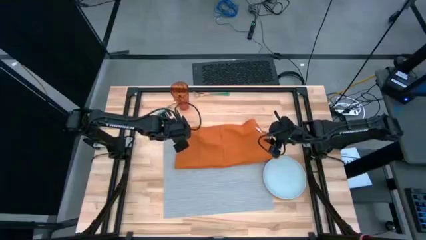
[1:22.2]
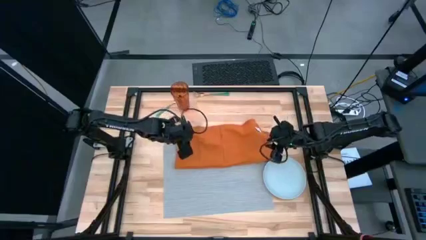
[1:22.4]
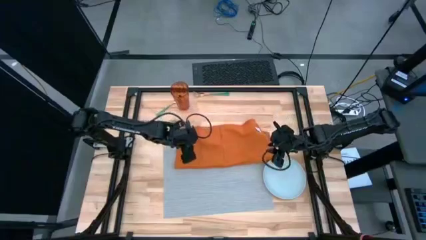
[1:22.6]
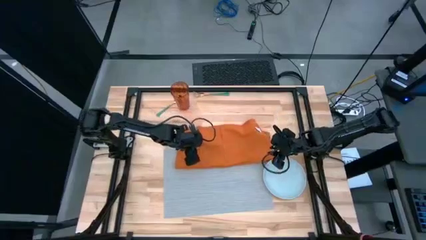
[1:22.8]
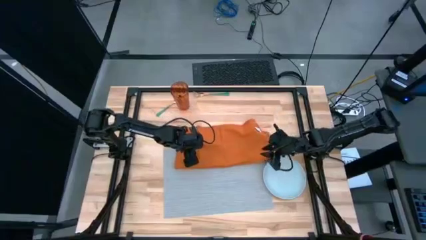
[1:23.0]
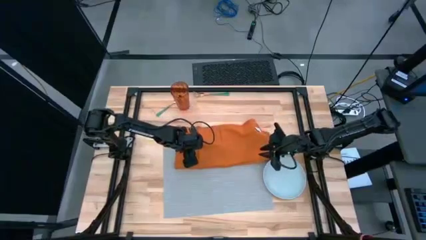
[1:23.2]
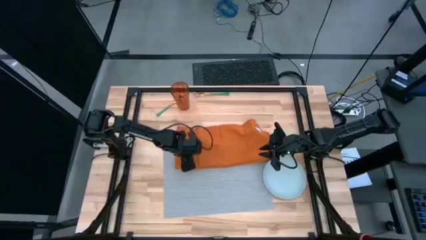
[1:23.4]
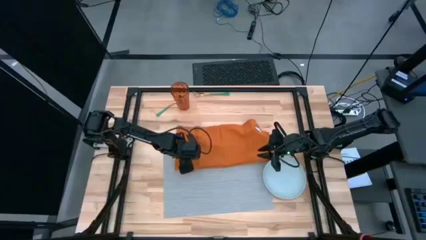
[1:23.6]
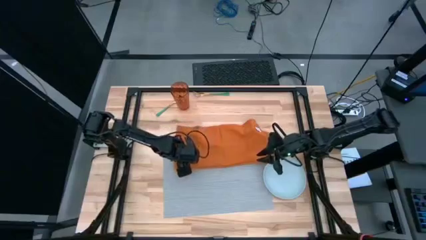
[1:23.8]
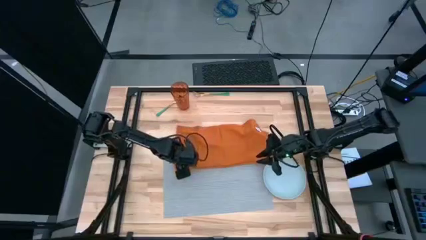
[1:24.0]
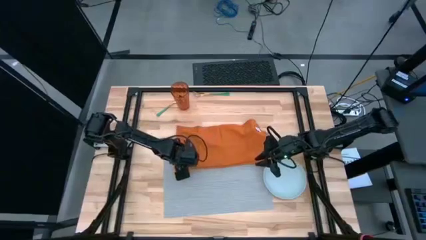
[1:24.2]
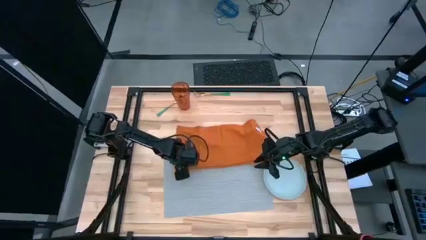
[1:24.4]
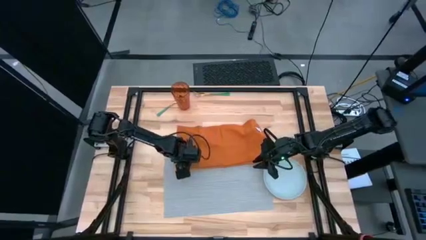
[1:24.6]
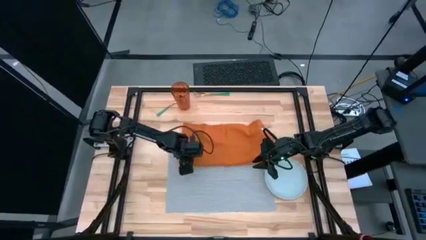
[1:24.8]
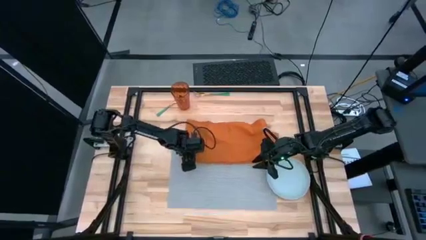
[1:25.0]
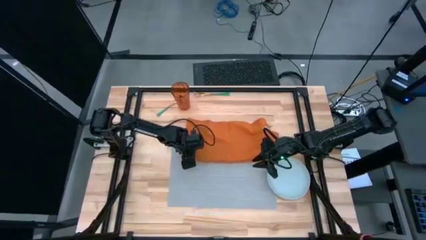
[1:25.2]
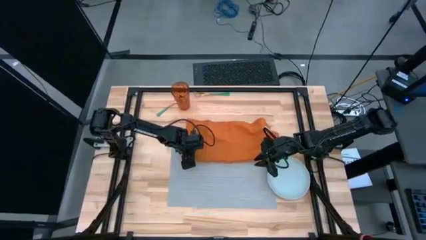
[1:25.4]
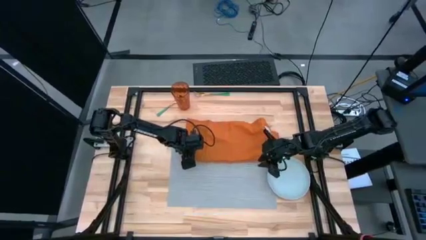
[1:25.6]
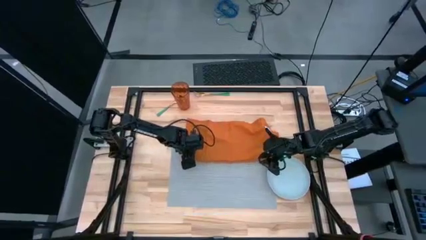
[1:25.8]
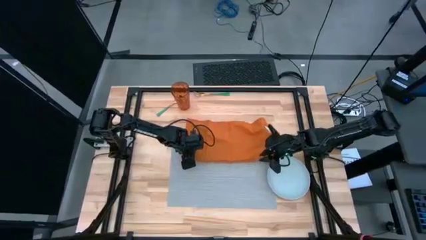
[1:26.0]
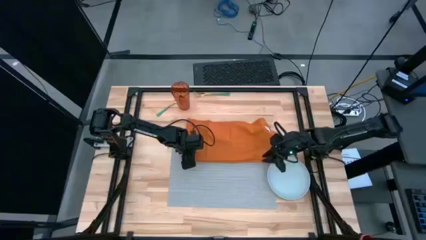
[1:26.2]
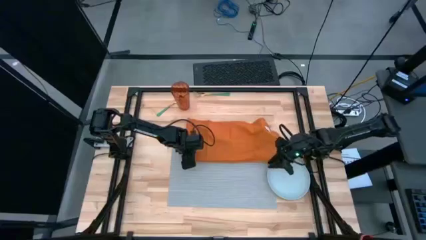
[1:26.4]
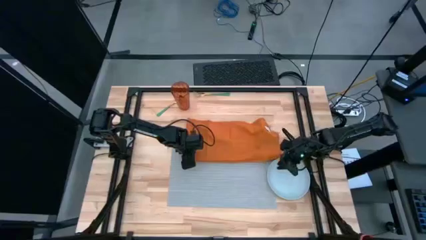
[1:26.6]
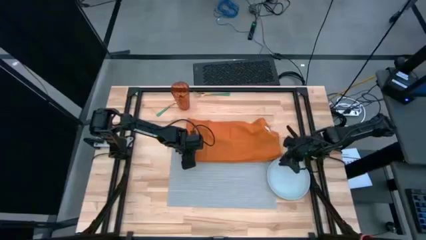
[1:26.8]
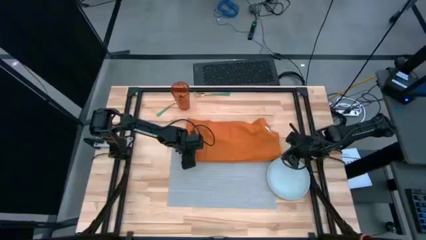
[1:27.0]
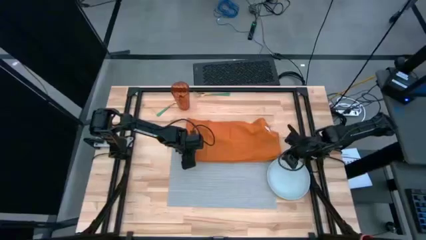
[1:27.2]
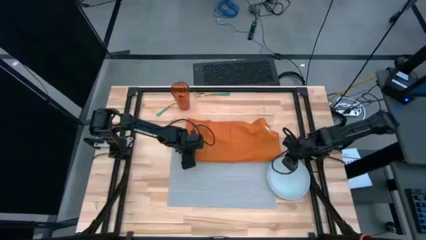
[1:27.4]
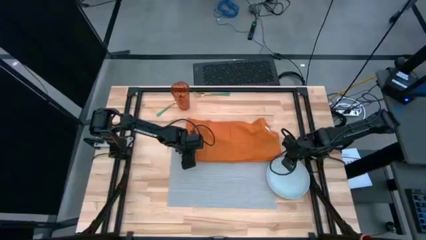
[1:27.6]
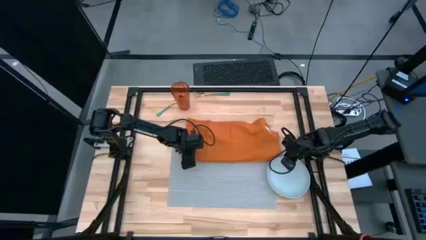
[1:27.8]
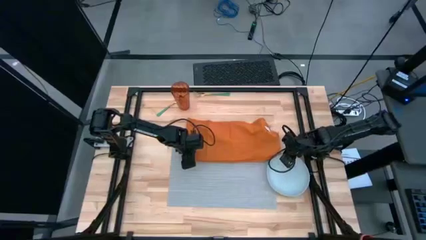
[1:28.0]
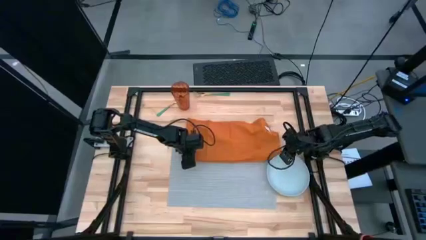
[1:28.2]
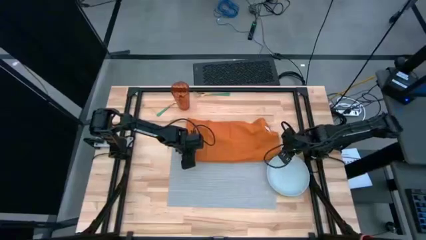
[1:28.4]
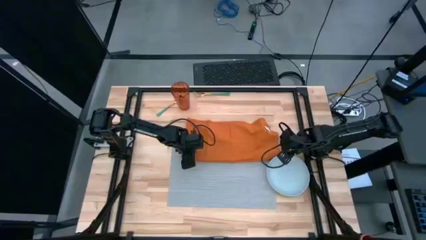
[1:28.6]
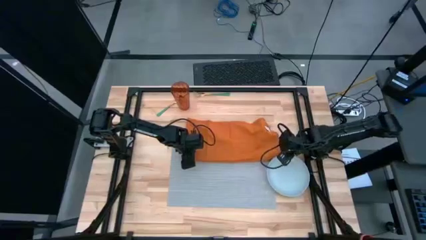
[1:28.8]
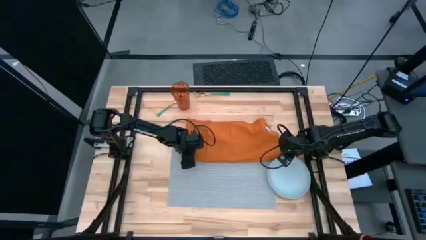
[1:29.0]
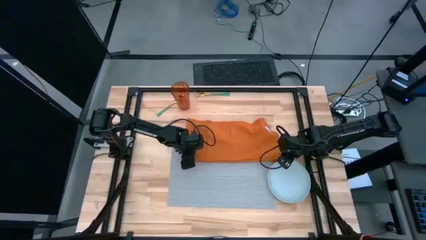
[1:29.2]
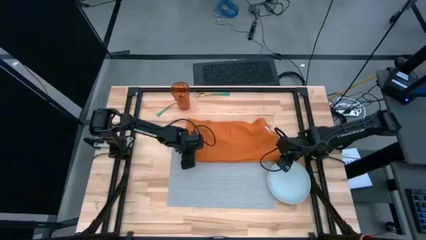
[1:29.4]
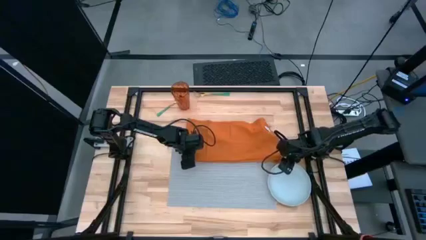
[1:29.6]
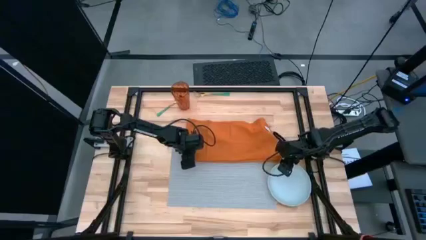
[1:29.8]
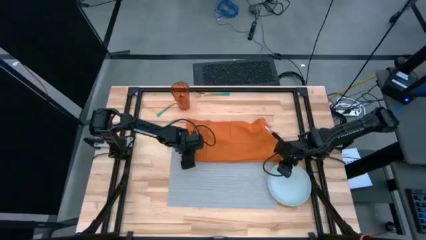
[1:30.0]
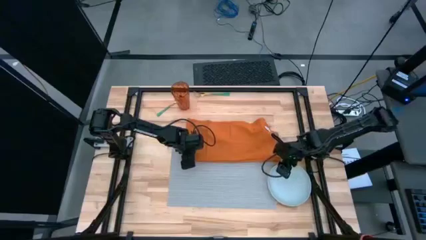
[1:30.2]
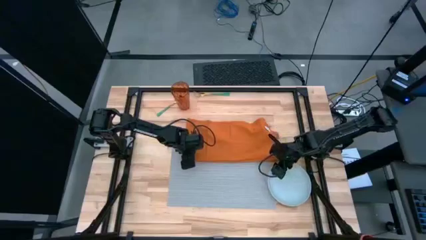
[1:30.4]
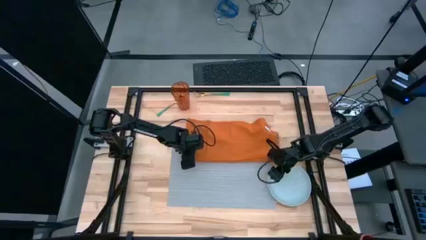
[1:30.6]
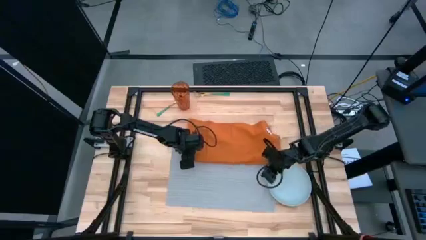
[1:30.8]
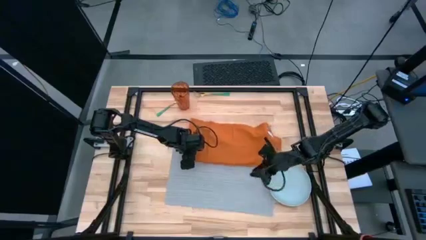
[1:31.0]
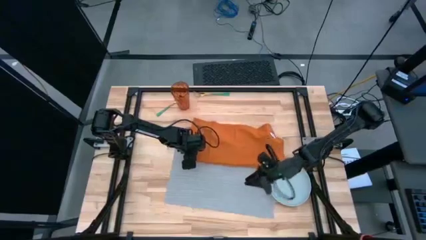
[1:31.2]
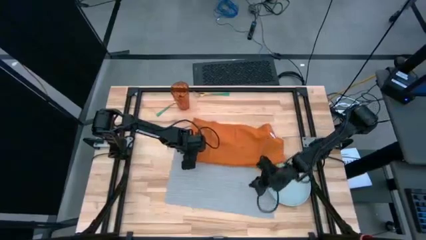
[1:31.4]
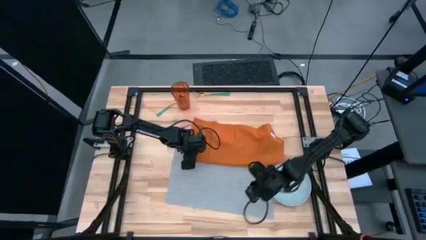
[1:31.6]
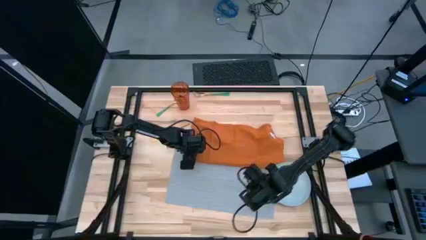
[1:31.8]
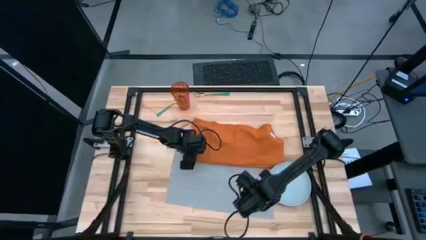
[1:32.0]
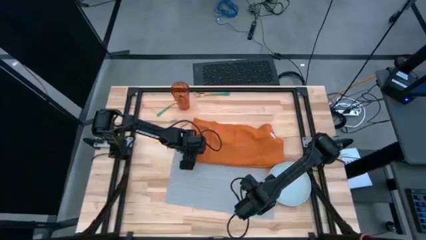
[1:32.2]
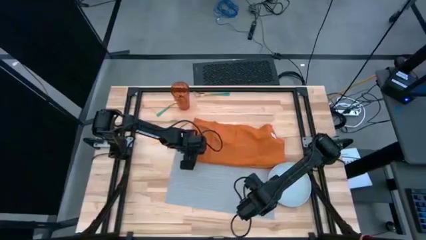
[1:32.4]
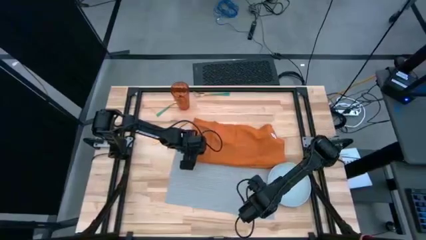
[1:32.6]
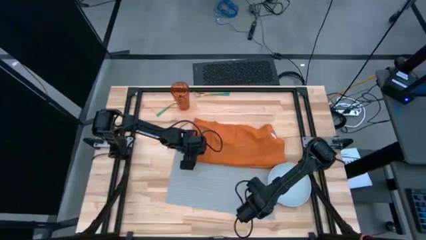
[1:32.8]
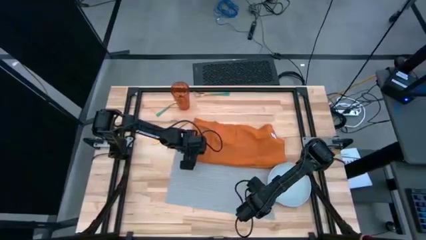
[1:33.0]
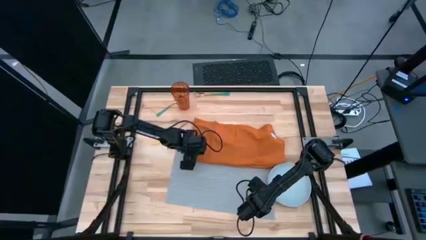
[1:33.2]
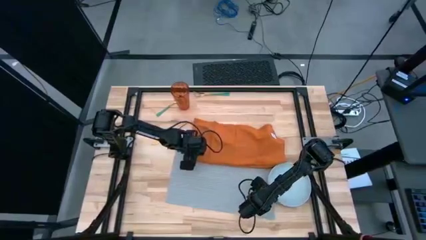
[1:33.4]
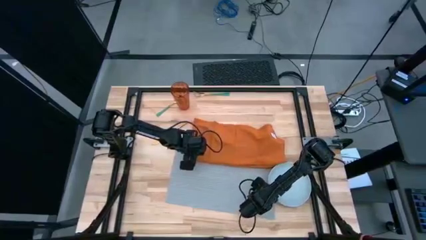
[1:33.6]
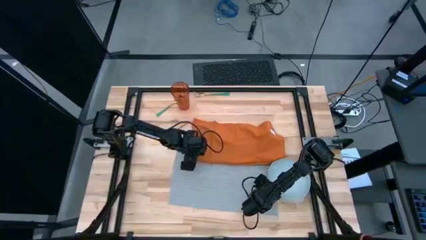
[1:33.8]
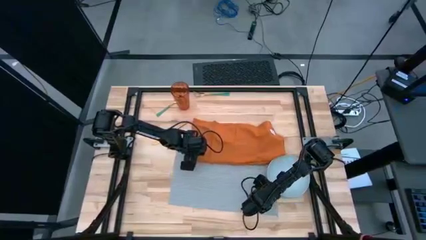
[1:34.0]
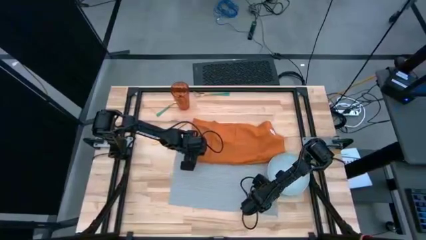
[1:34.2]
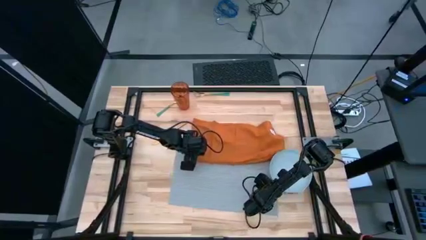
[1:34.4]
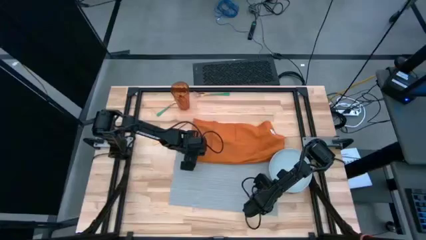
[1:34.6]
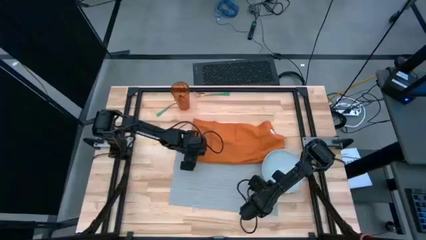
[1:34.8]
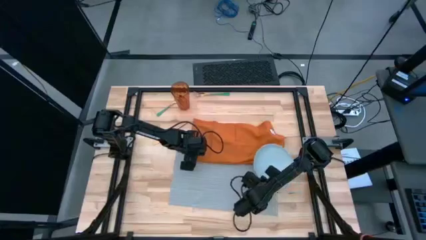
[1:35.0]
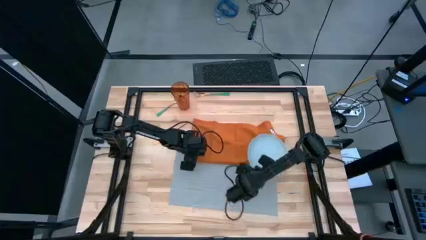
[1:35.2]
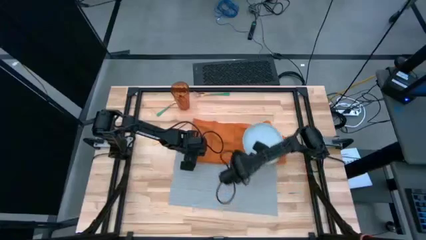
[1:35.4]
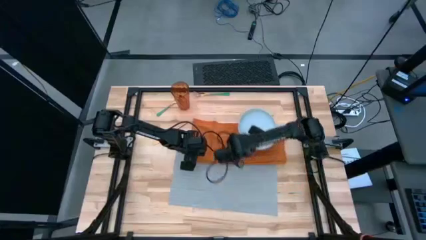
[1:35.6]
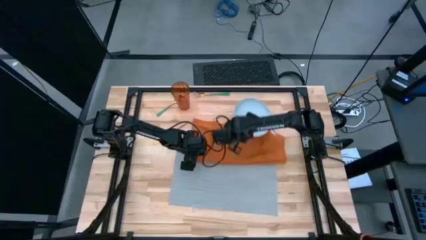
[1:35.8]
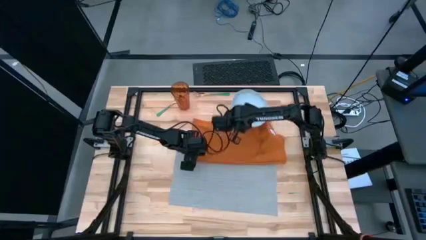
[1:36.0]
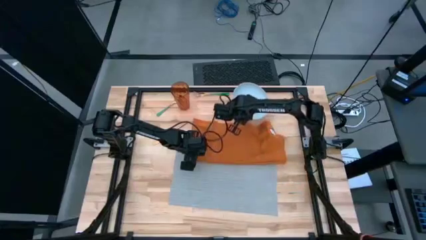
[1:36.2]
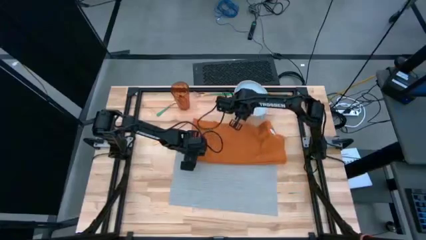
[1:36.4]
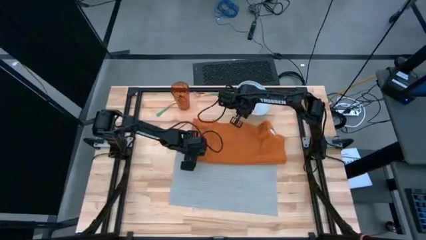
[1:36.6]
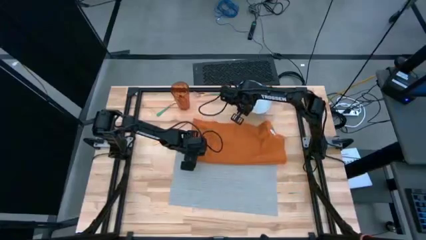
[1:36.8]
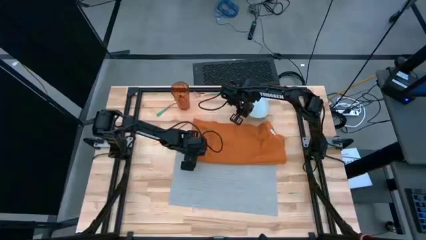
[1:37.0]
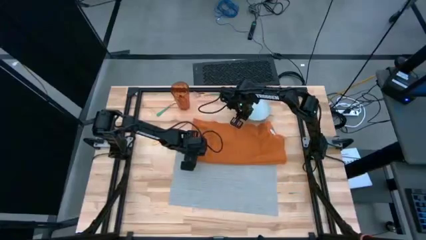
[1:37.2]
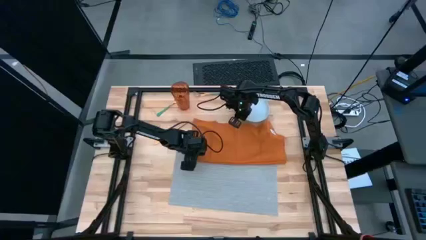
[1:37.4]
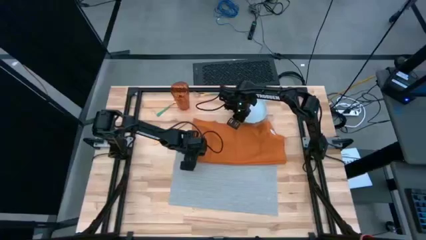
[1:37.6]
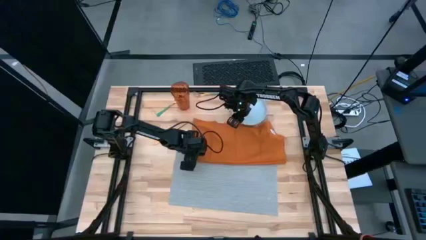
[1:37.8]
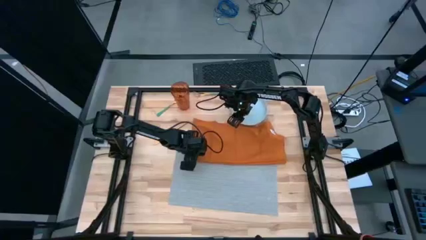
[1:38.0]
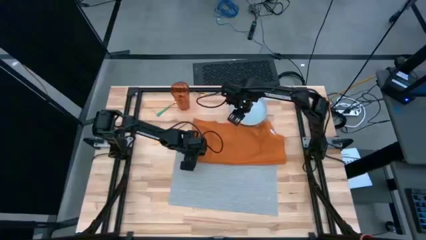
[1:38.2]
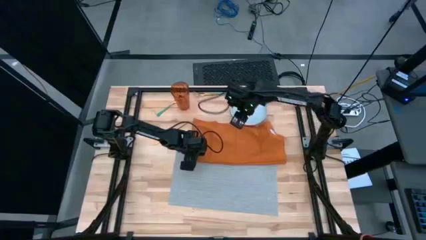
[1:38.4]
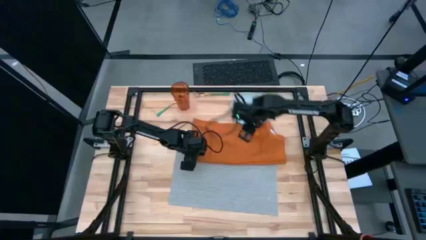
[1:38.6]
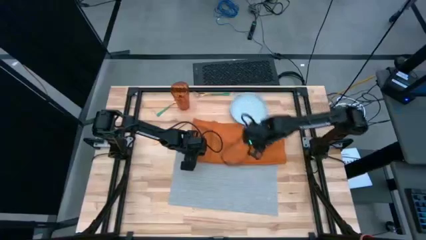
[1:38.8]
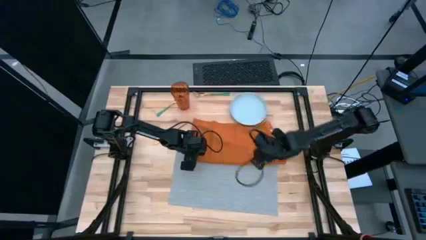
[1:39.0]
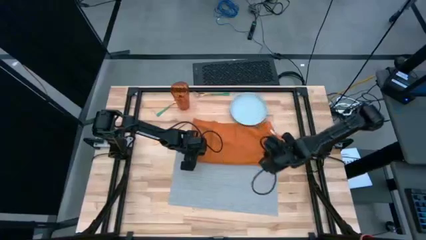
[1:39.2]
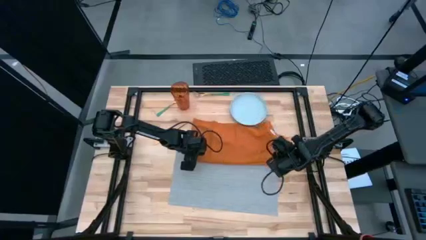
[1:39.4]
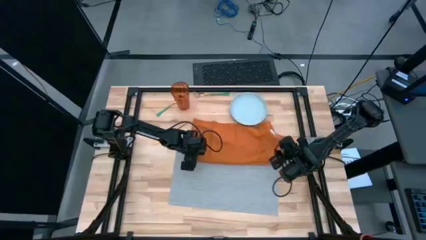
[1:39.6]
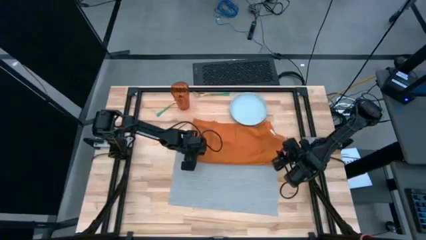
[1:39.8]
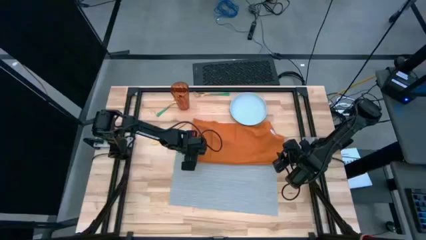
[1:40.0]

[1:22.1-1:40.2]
Task: Set table place
Fold the orange table napkin
